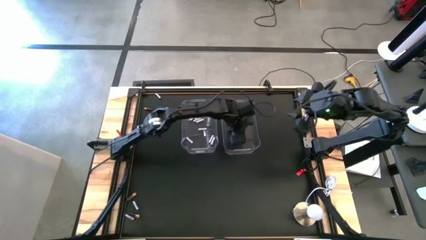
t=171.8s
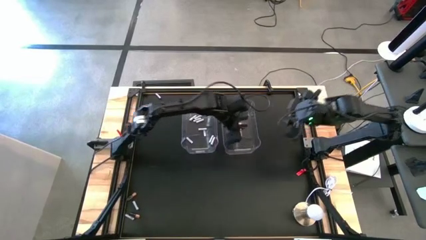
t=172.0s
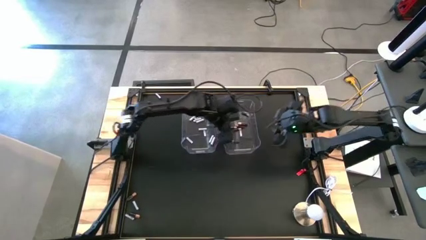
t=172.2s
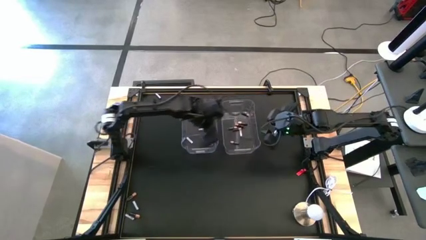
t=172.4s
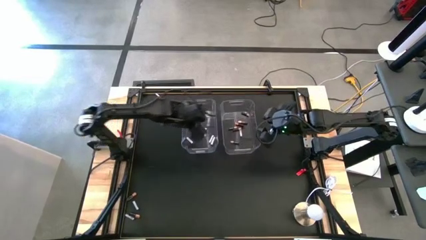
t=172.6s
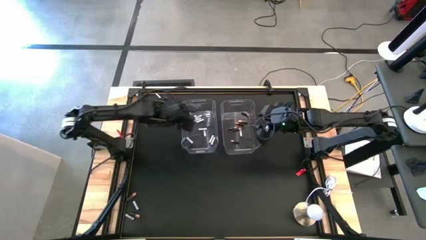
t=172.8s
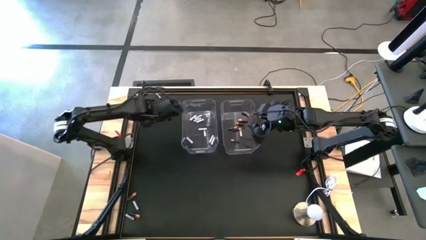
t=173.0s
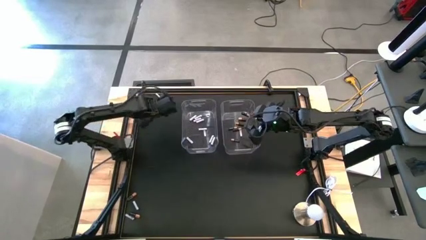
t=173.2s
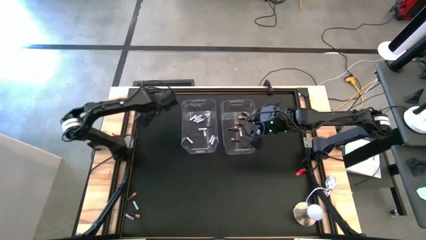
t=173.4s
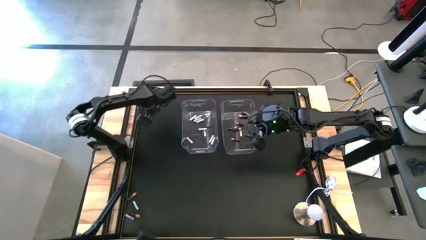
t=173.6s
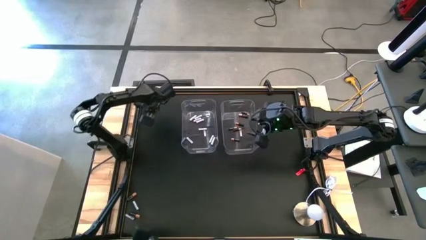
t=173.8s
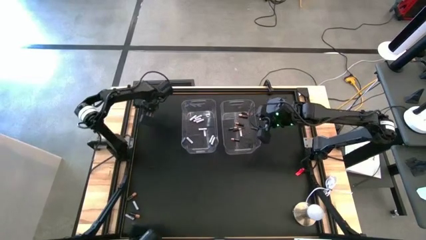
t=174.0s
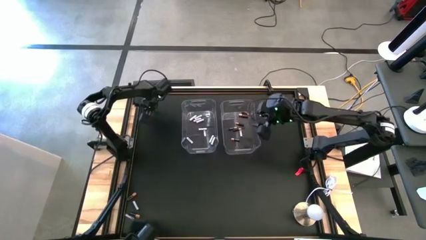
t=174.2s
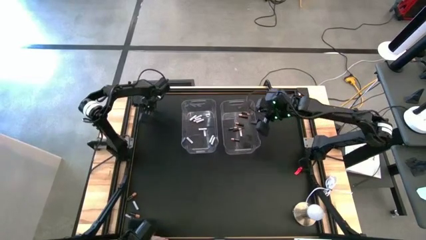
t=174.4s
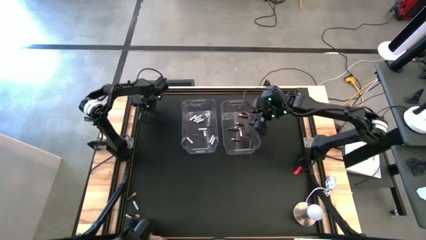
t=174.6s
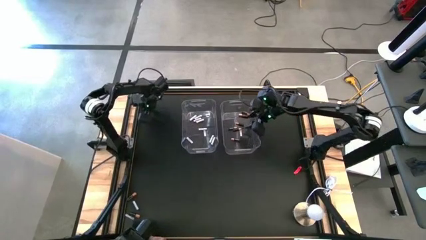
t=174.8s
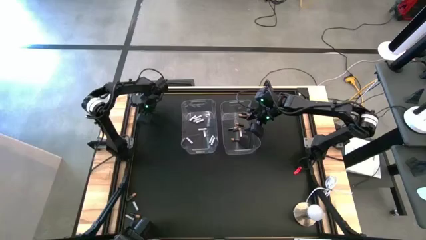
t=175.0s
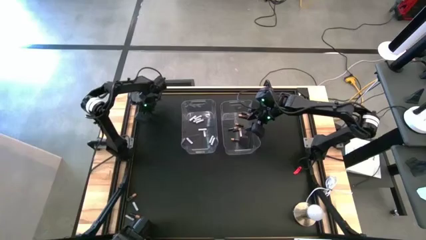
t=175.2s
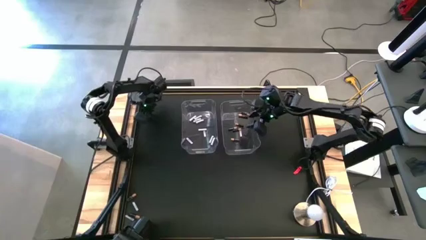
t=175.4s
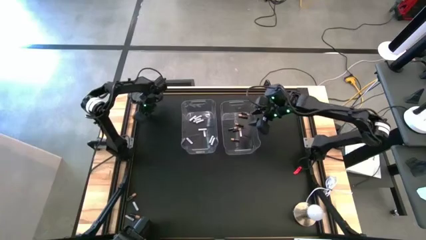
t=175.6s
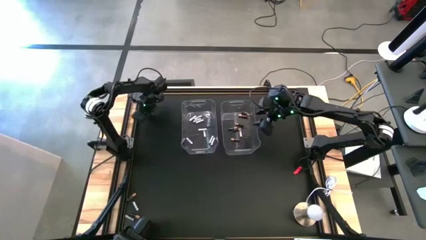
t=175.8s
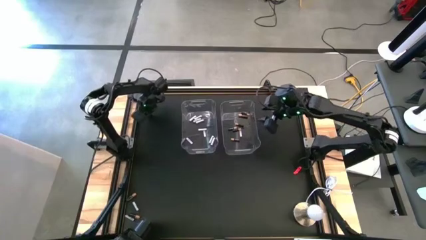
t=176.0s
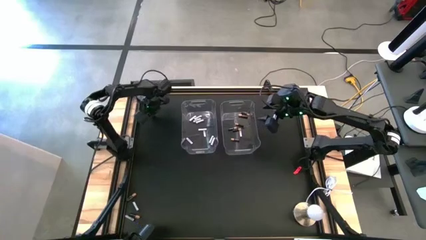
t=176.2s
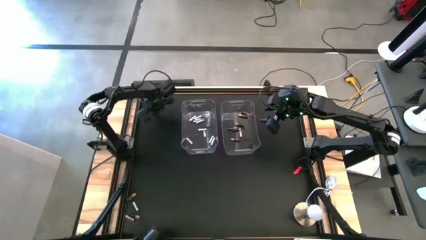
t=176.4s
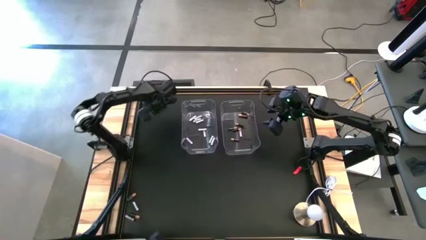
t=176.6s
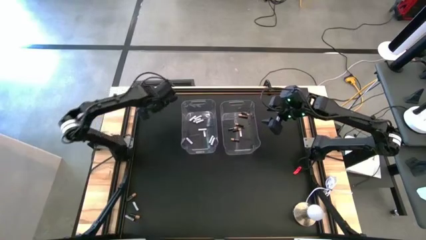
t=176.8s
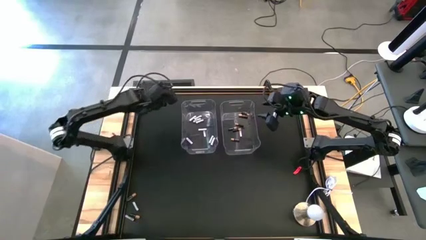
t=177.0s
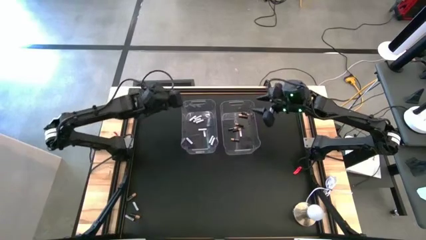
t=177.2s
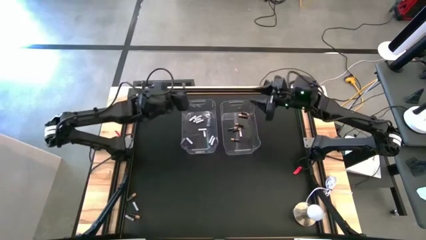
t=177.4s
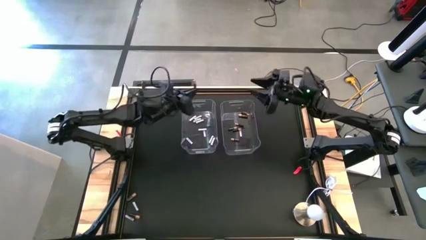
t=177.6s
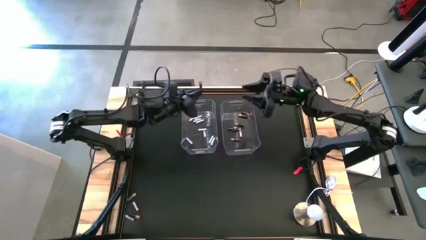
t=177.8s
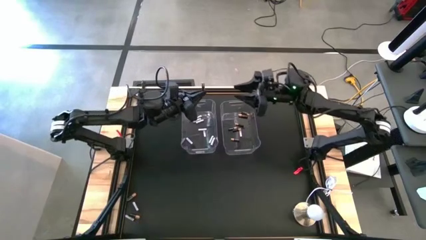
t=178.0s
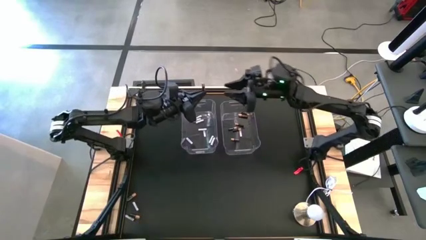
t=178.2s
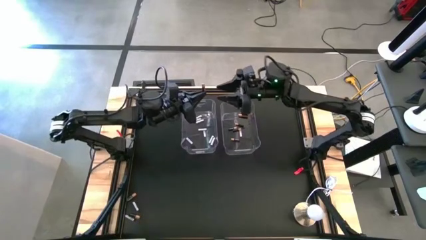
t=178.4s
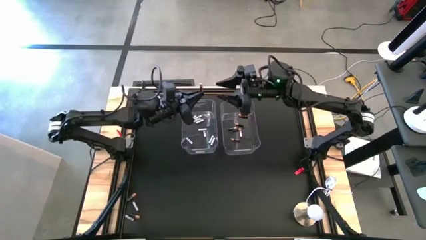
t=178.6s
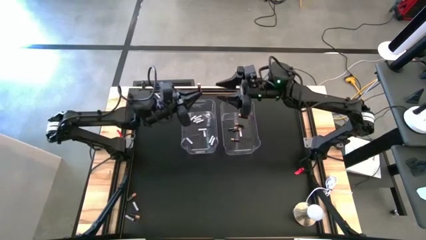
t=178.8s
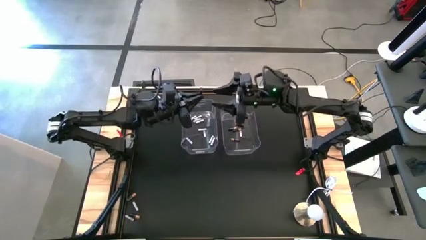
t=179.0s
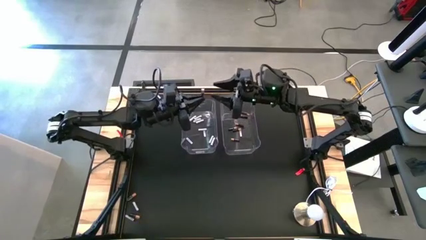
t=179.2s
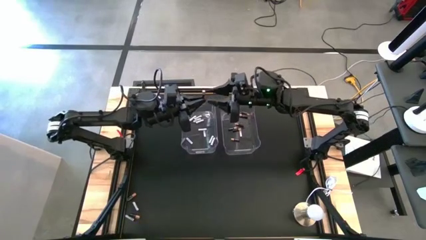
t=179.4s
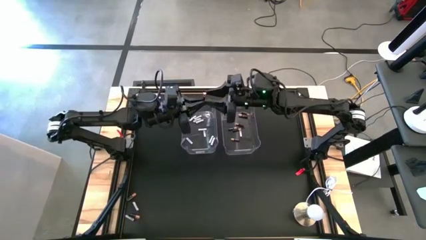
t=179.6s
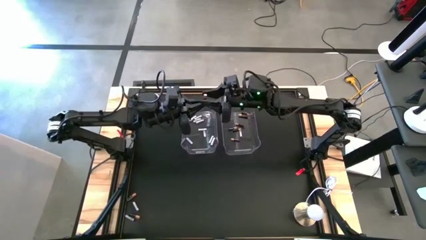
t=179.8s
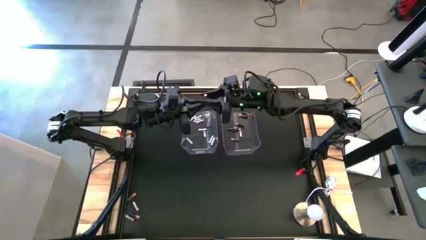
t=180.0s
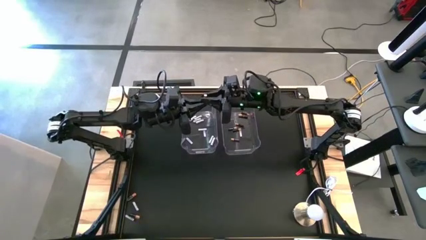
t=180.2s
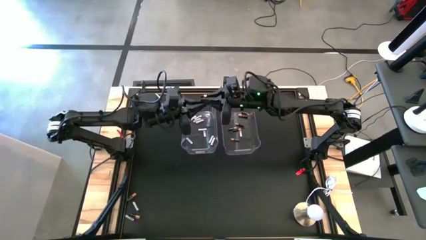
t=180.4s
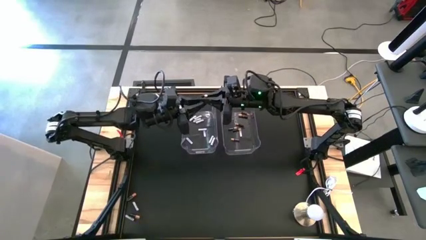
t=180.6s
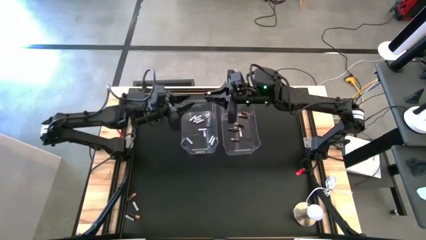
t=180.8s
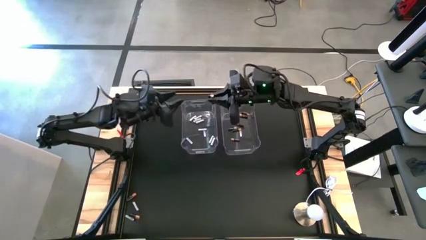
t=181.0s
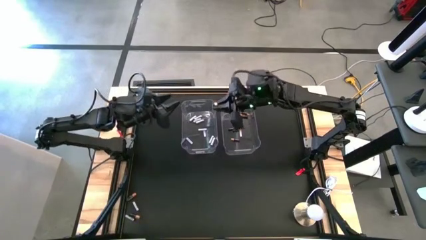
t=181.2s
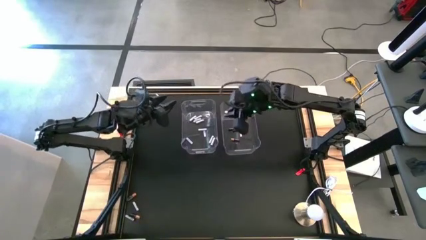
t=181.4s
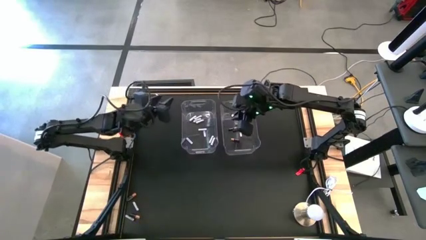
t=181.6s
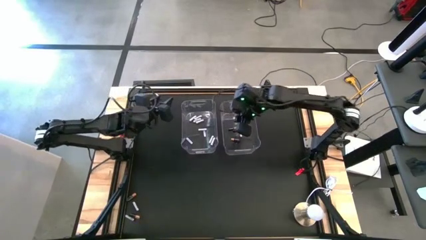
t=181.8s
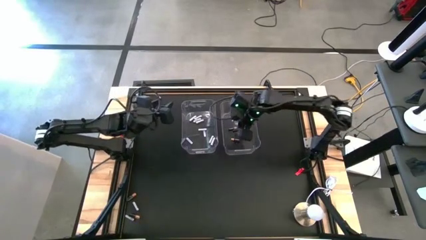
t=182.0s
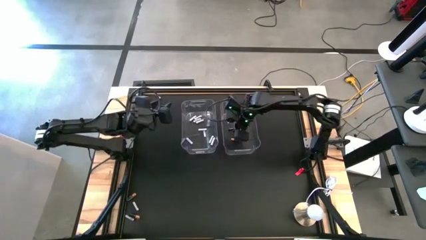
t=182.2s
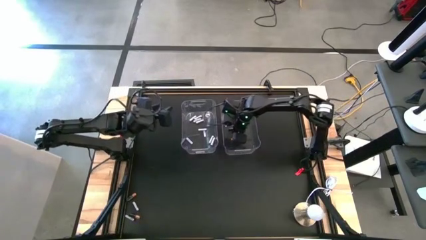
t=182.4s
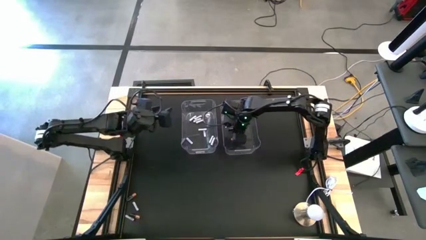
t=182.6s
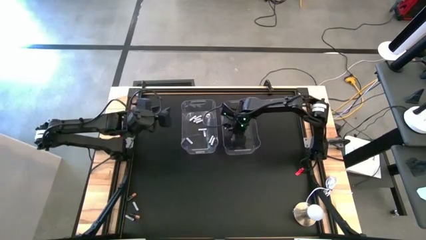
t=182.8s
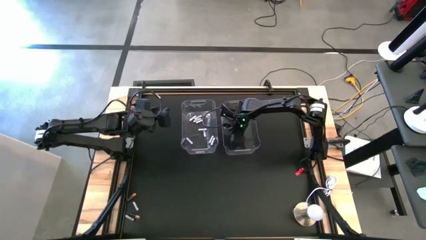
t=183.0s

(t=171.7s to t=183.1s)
Task: Sort batteries
Put the black battery into the right transparent bin

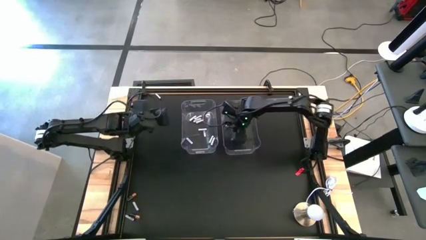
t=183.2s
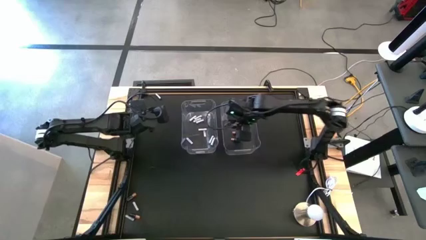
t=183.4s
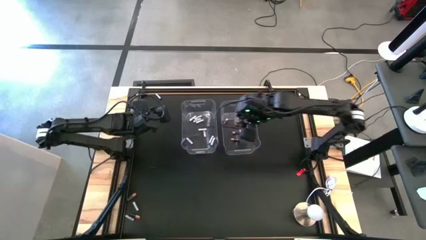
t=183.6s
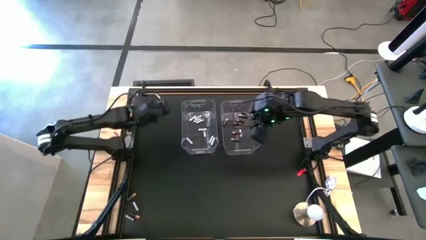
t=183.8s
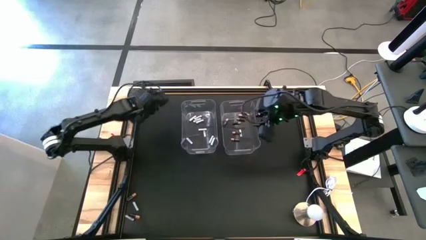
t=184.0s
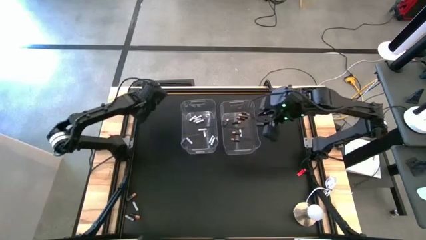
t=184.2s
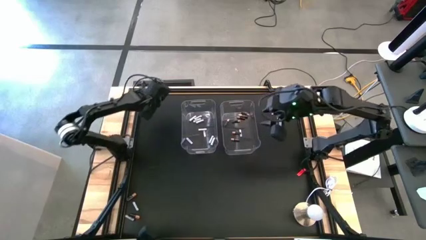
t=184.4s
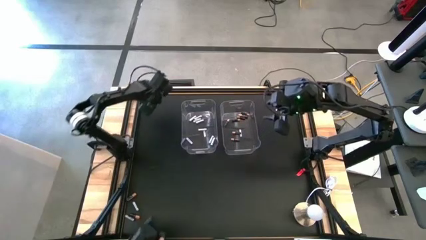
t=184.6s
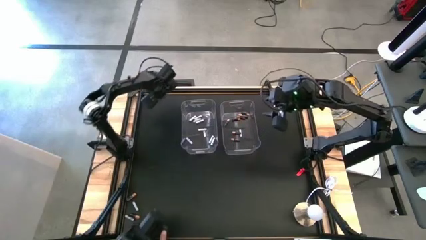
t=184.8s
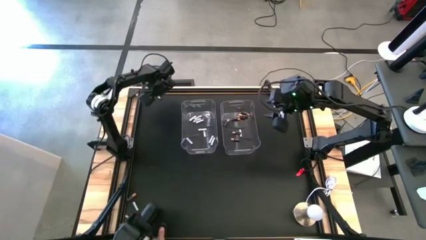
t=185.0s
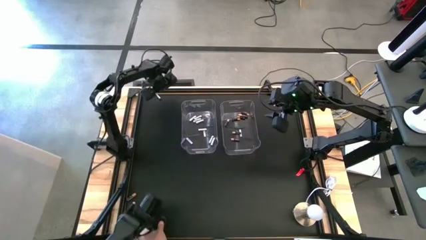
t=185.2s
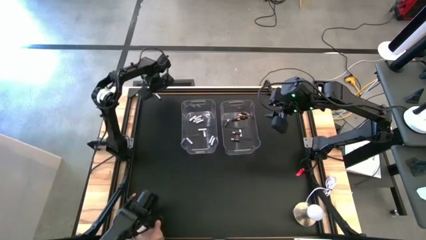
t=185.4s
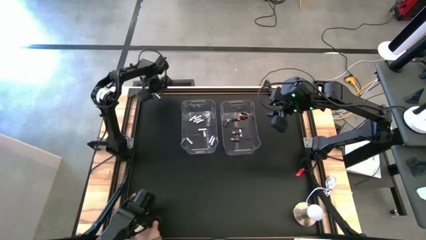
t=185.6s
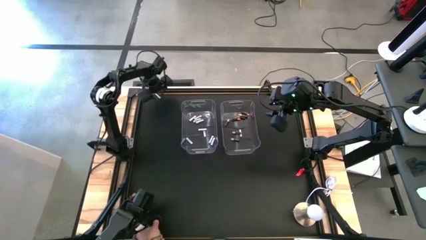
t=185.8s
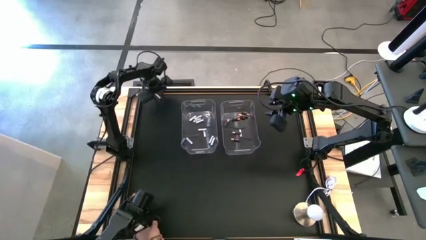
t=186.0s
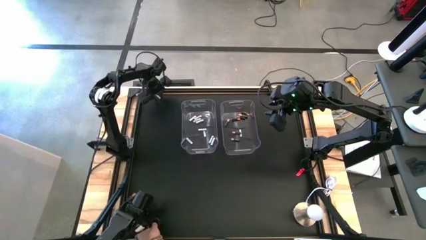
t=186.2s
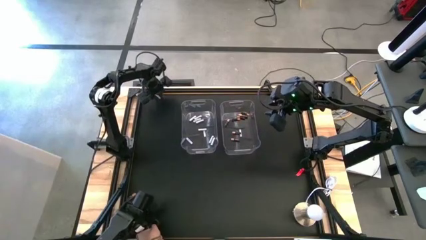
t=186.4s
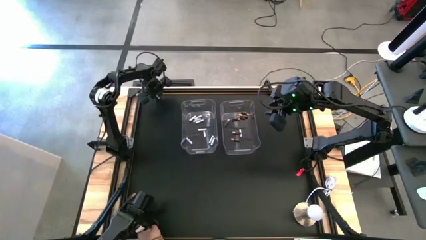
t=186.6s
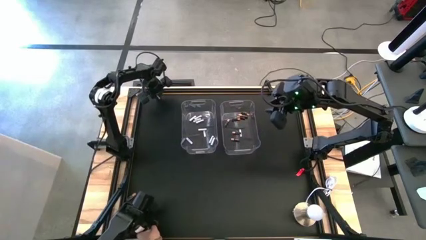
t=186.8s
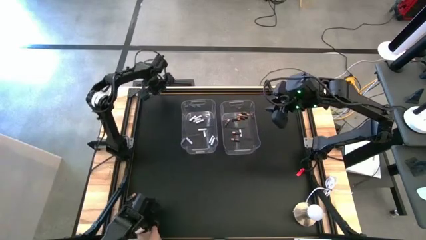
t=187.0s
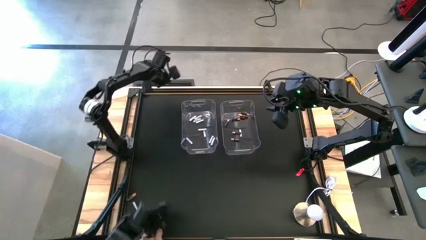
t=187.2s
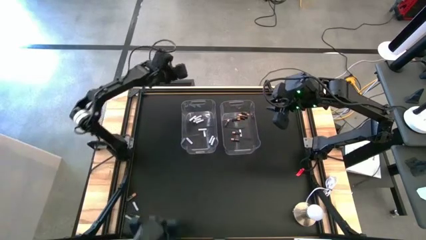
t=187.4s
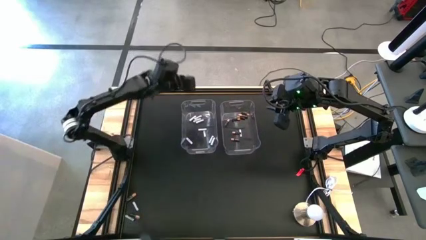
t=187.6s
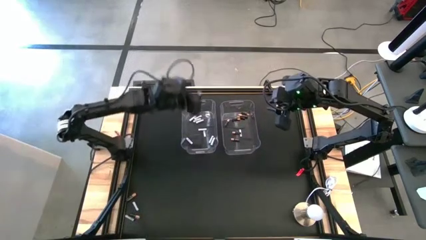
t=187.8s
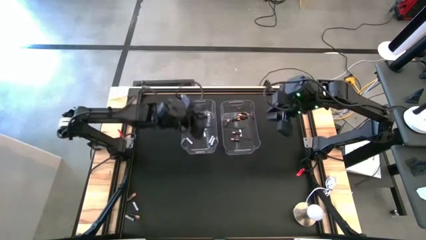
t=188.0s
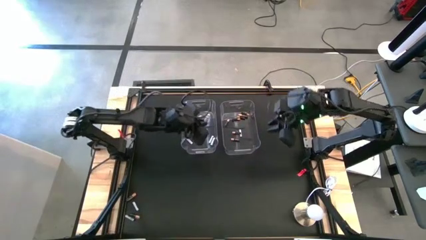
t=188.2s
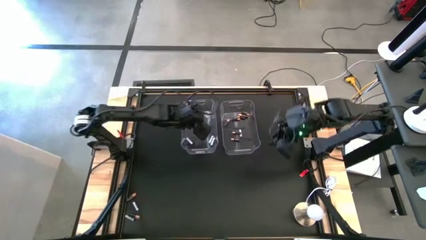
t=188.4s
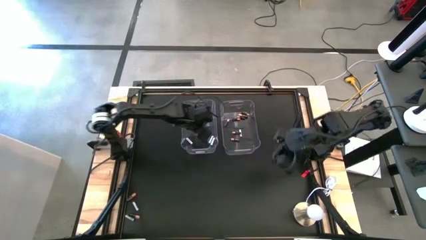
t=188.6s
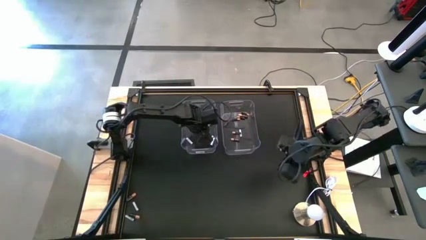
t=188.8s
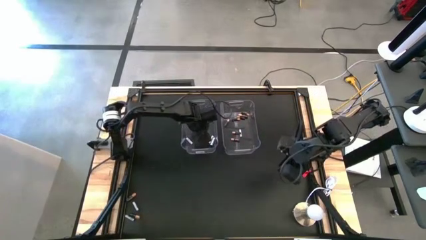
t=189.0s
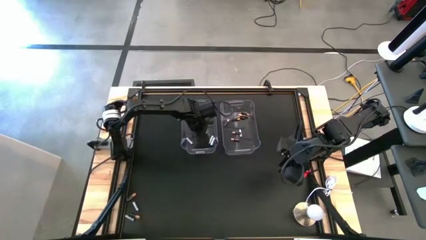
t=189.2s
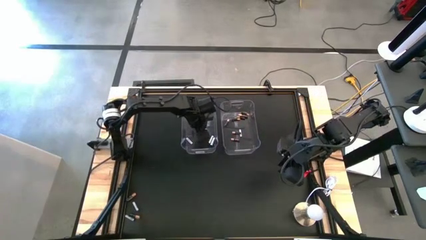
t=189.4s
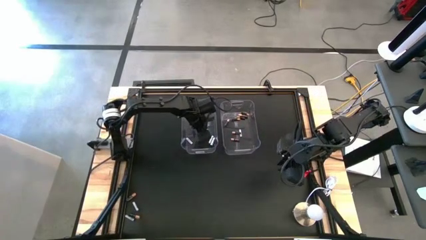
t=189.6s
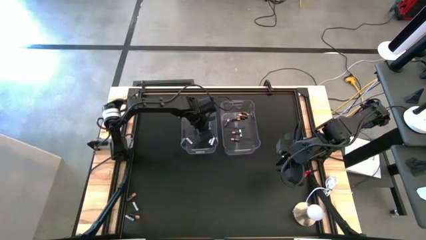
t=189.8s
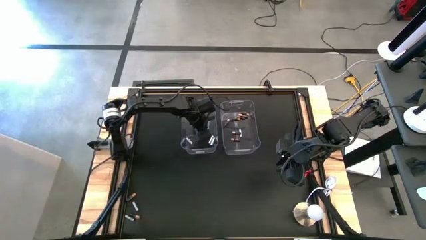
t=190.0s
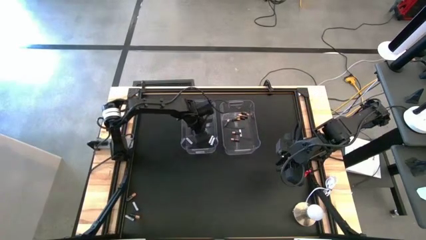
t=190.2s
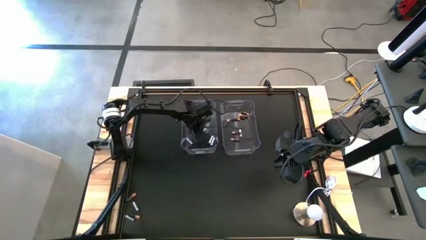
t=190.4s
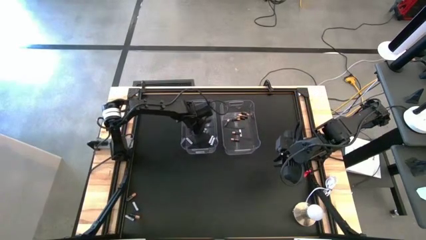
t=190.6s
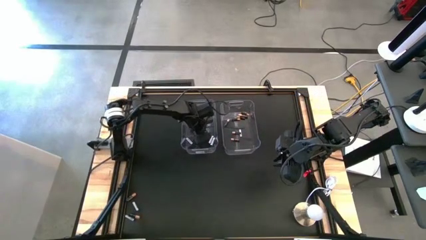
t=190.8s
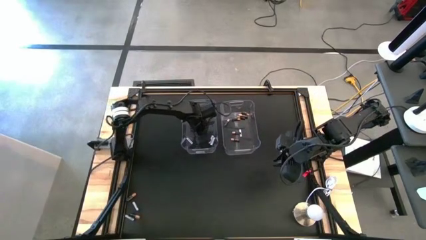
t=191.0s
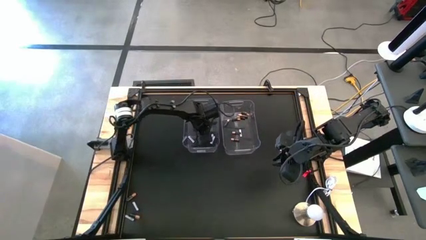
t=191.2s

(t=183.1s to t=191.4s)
Put the white battery into the left transparent bin
